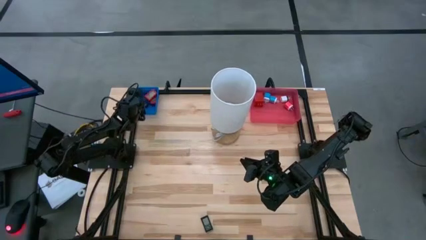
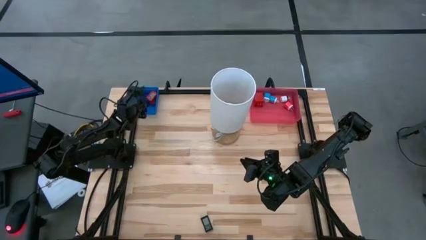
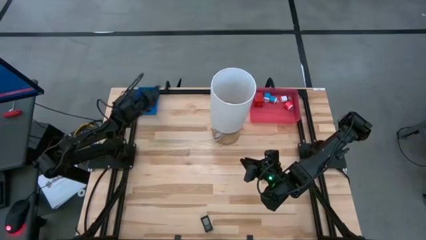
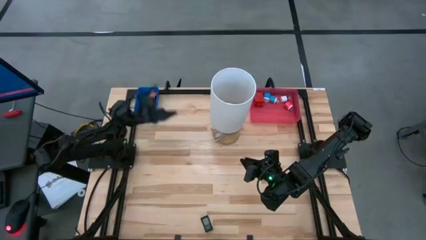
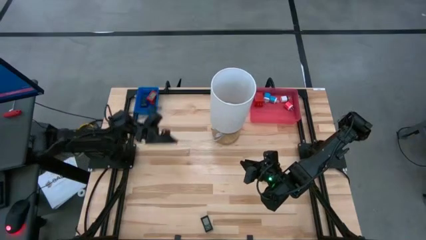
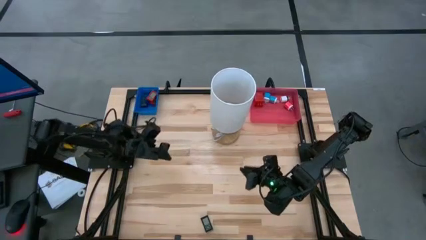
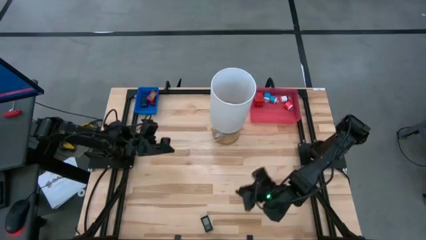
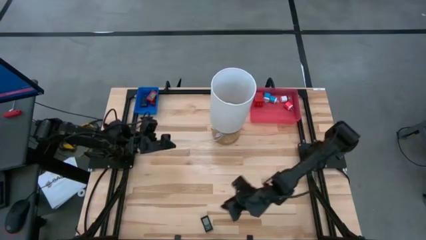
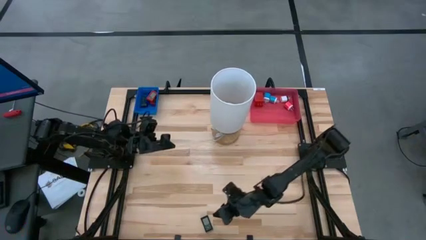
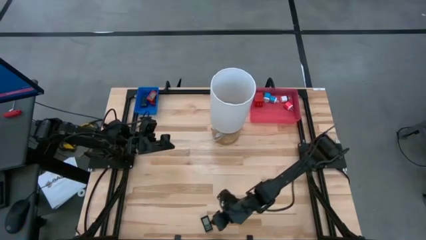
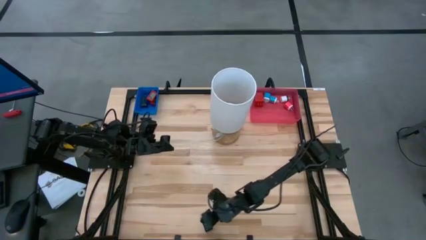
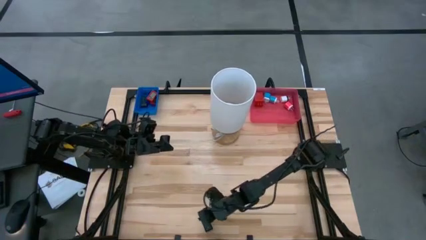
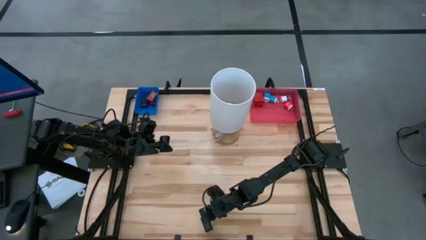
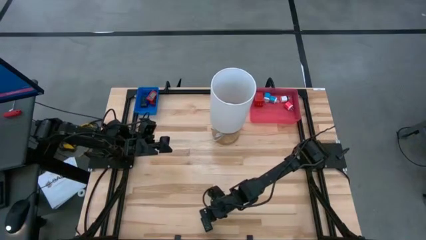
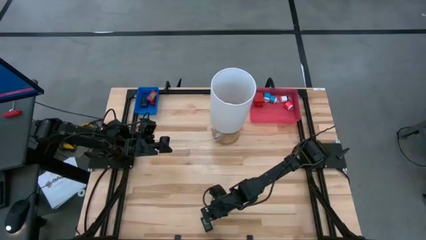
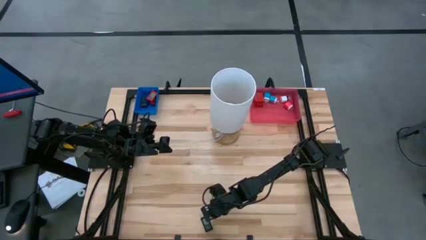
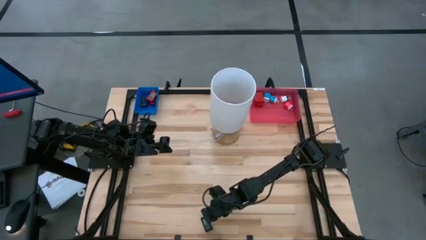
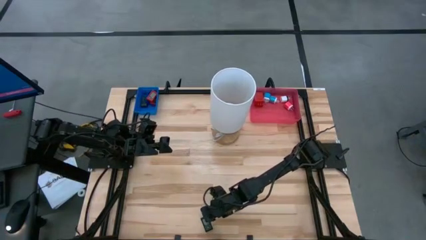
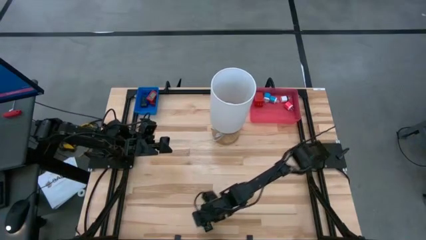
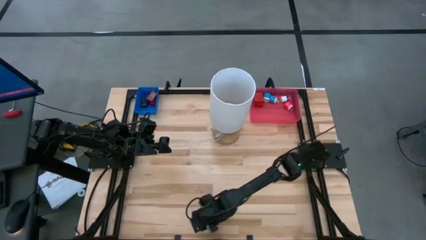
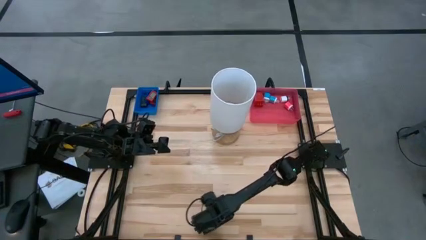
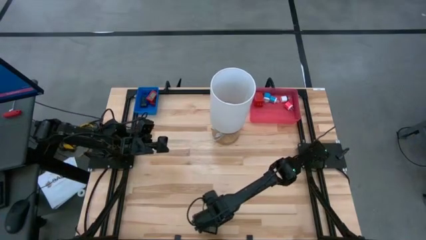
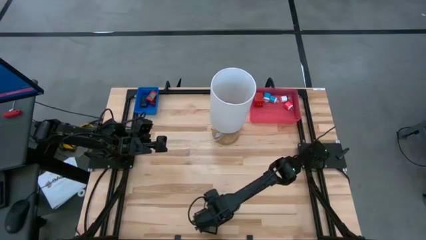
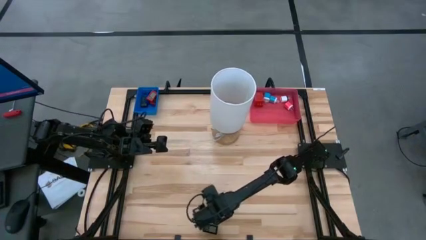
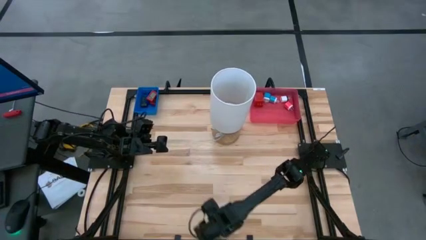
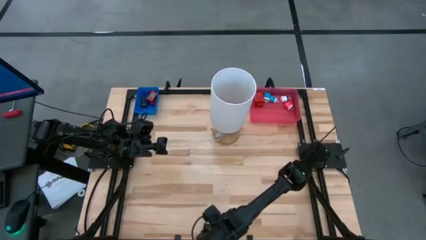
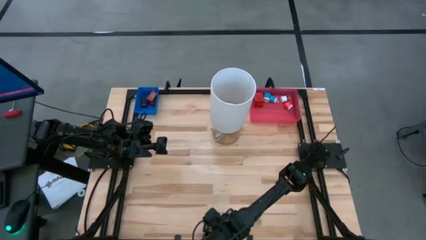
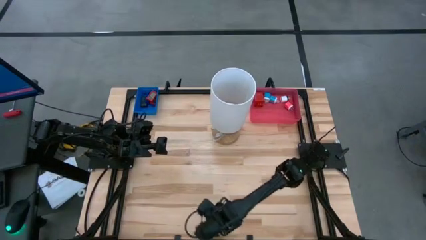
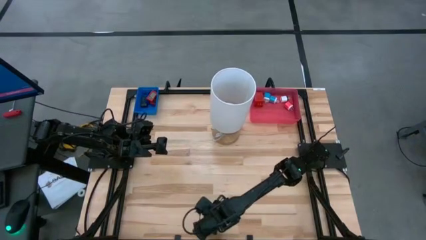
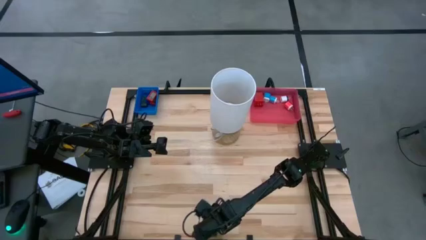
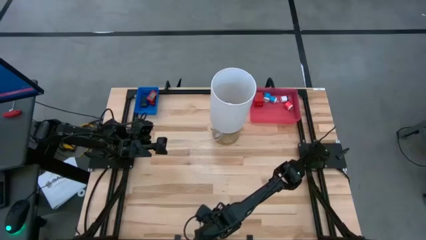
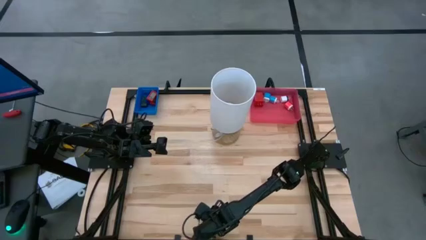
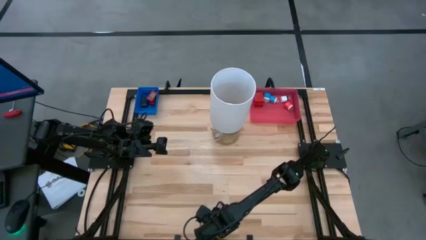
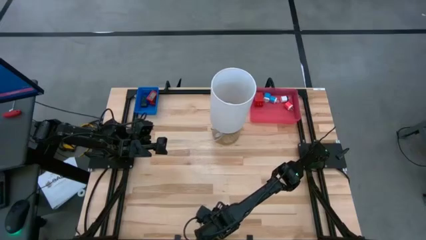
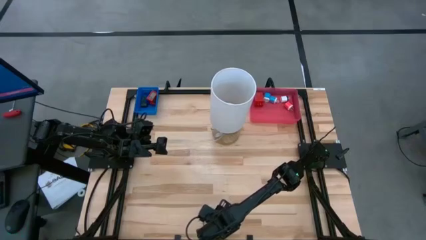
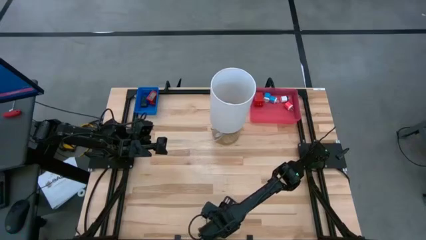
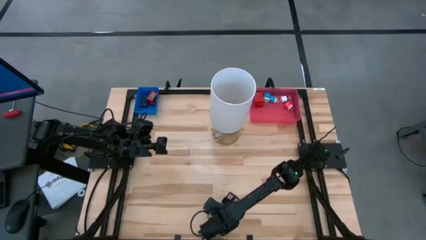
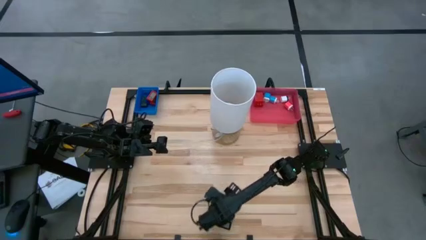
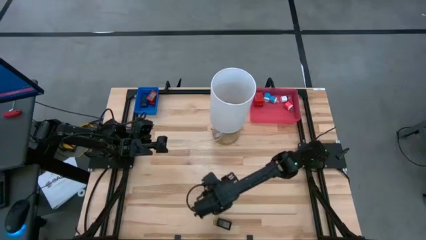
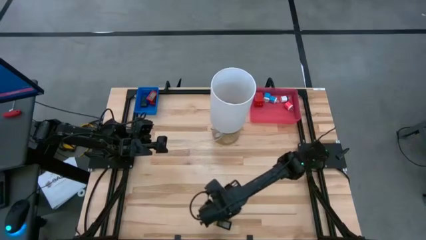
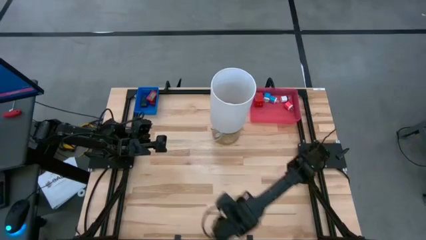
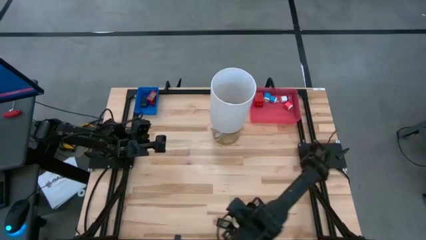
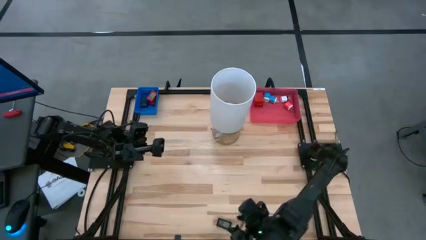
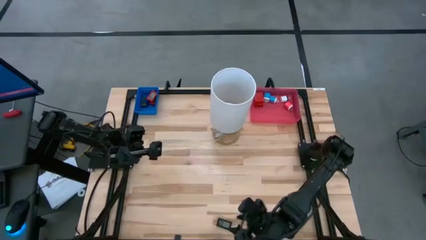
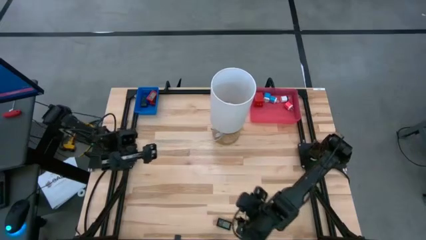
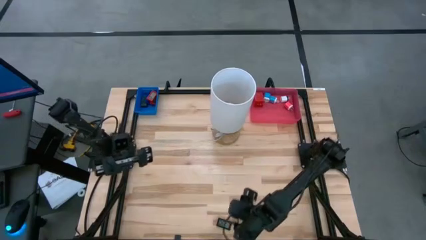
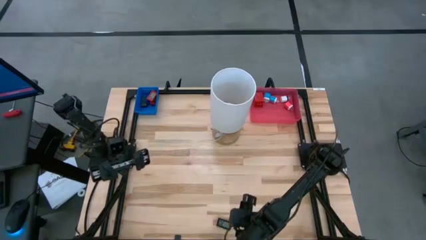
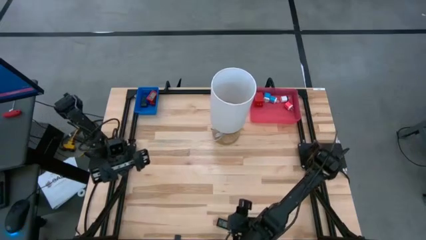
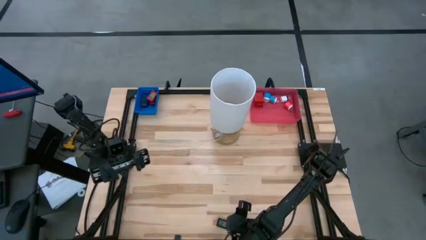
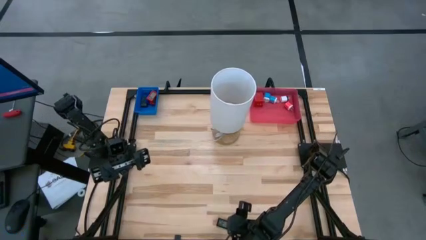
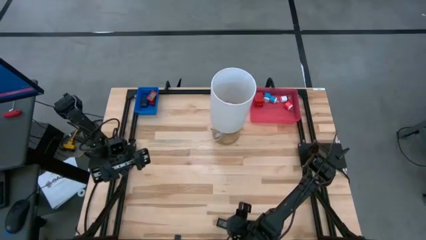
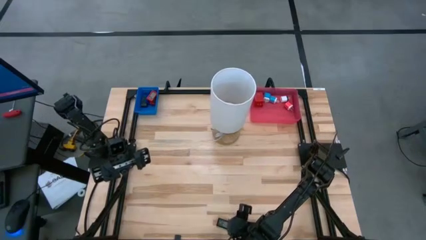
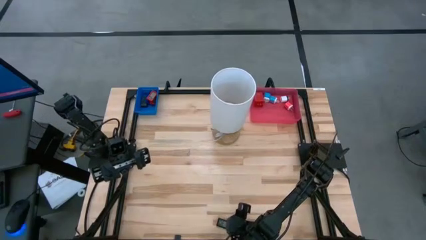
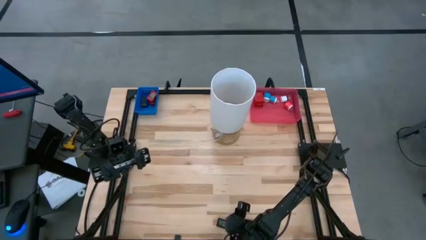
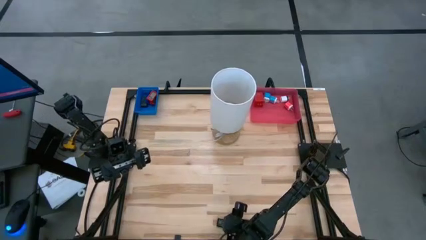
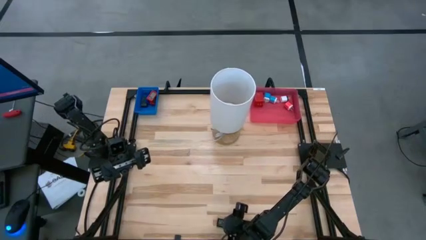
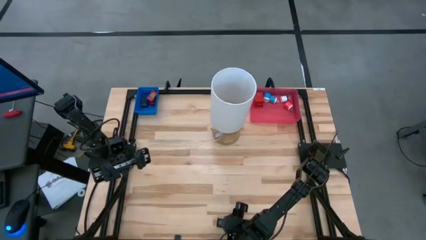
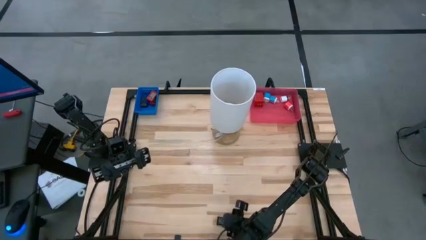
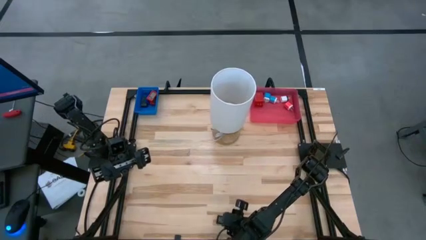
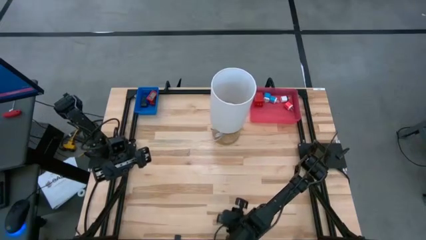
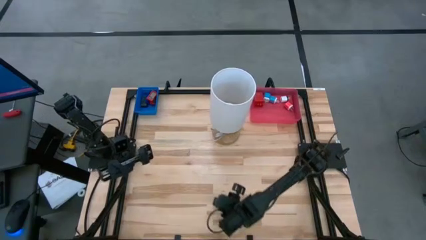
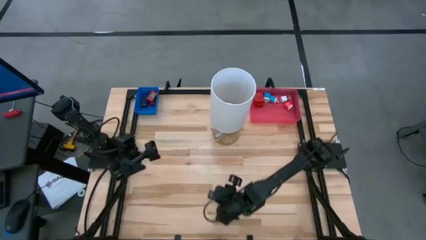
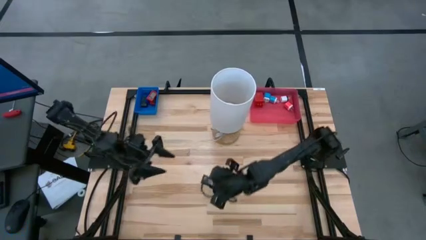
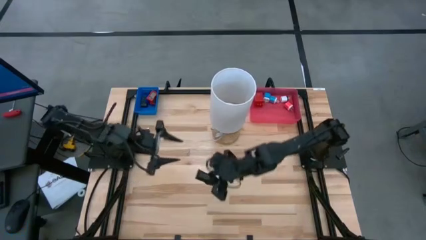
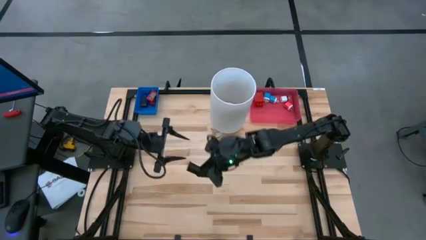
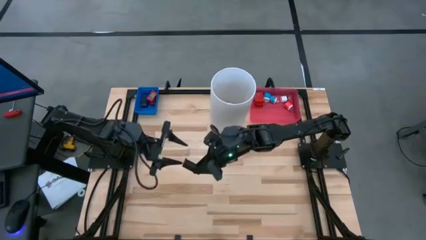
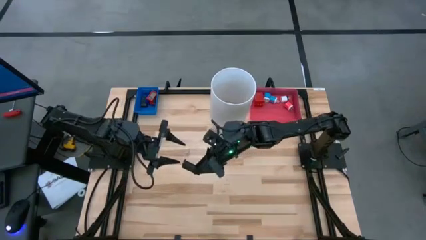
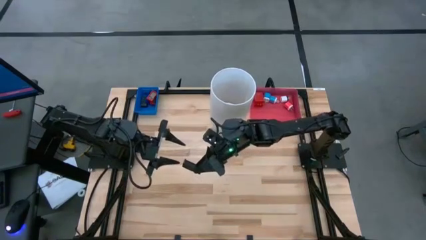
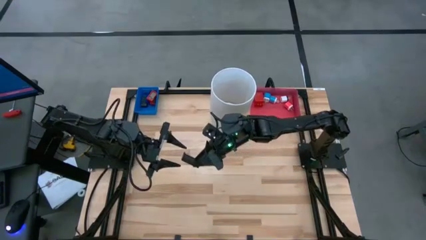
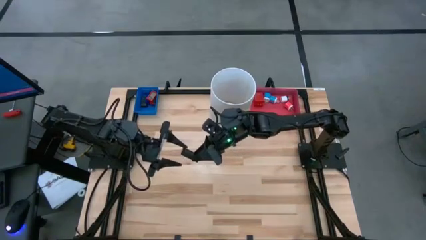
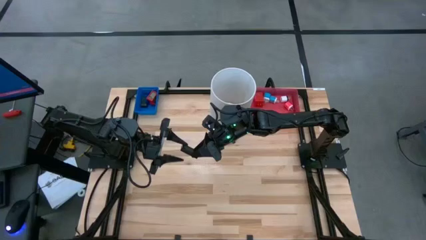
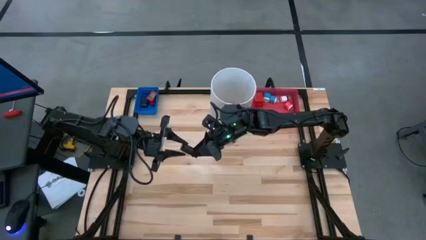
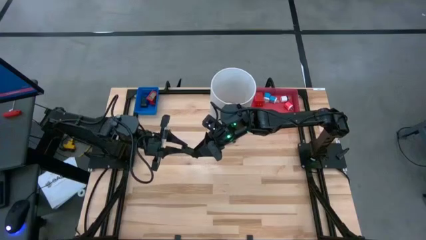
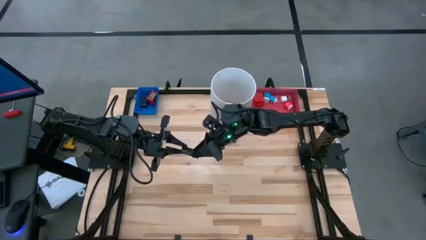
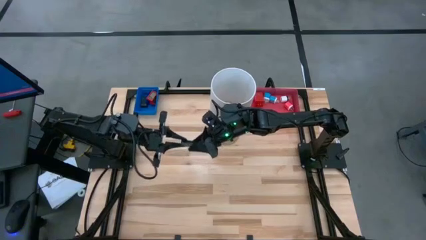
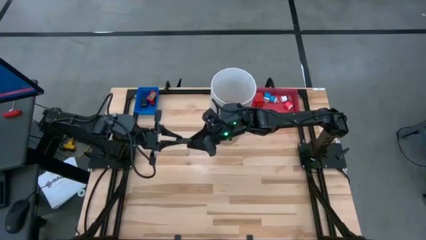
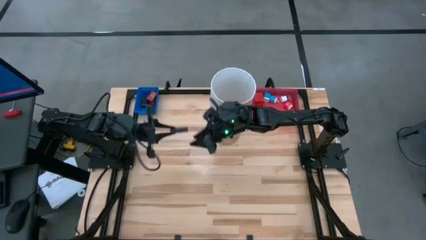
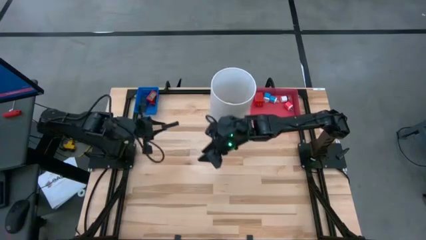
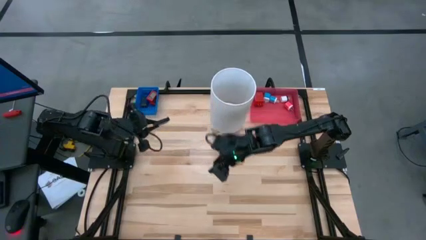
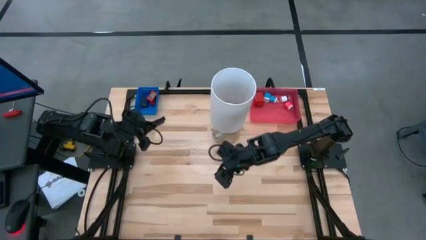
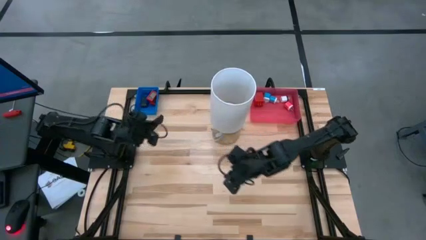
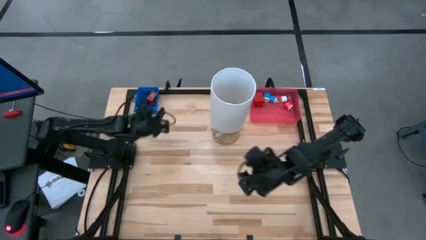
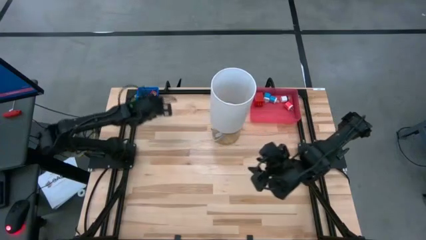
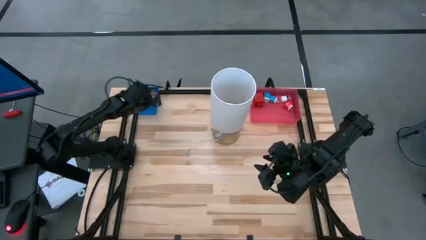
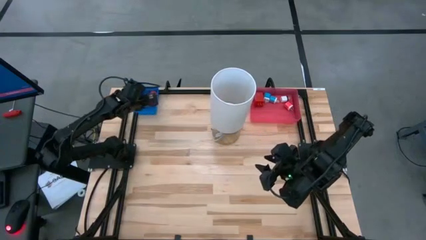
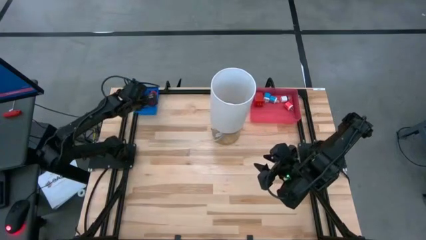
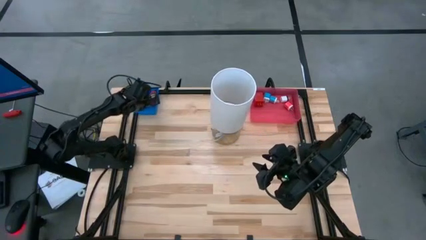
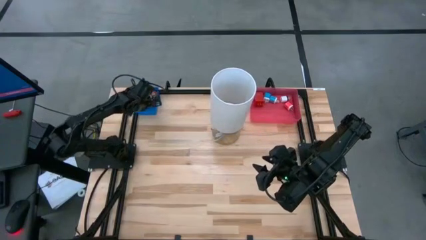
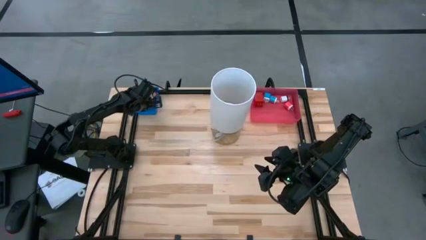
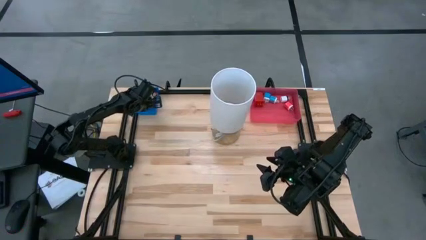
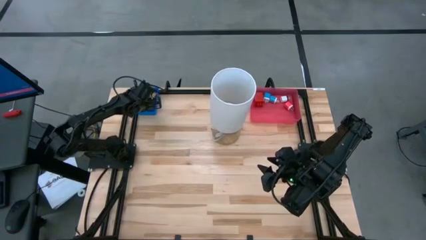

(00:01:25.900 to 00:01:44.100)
Task: Pick & Place Office items
Put the black digital timer into the blue bin
